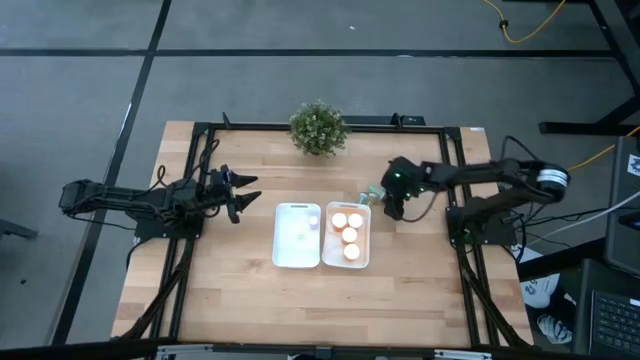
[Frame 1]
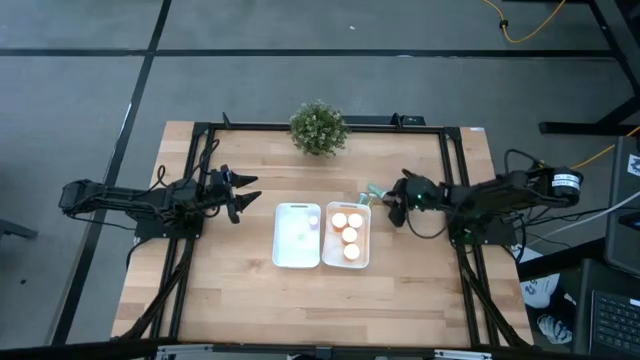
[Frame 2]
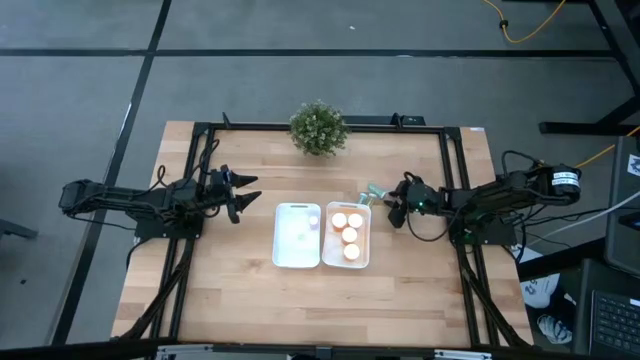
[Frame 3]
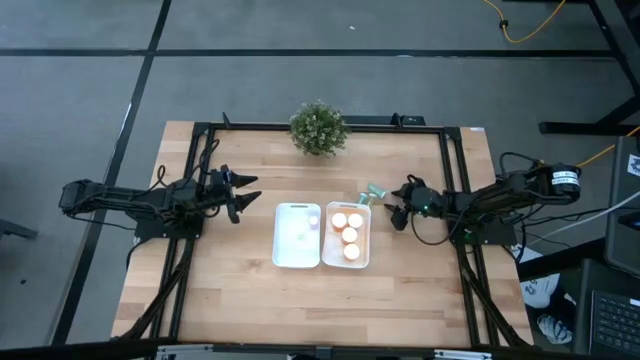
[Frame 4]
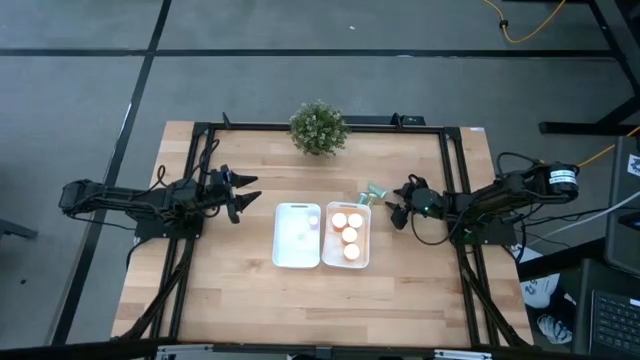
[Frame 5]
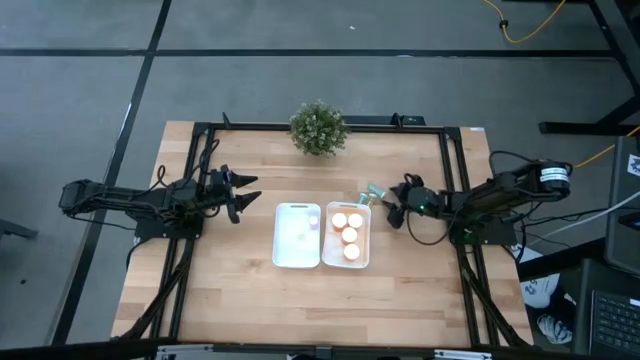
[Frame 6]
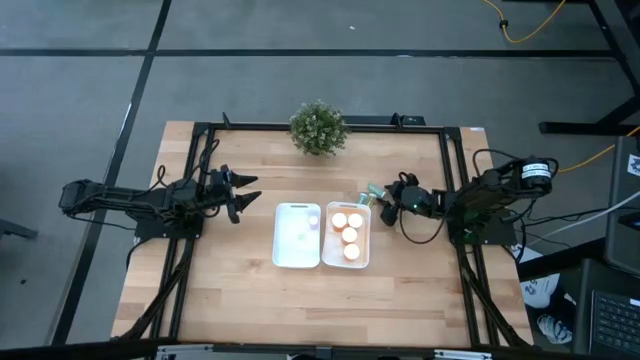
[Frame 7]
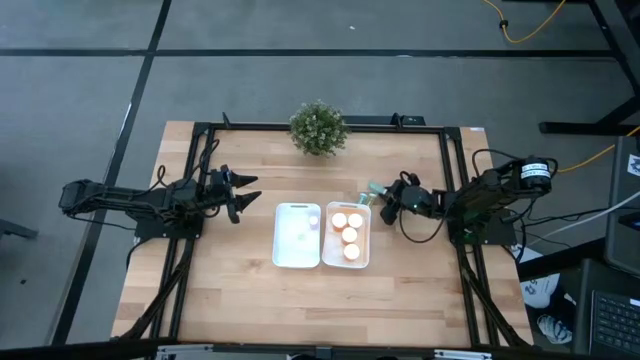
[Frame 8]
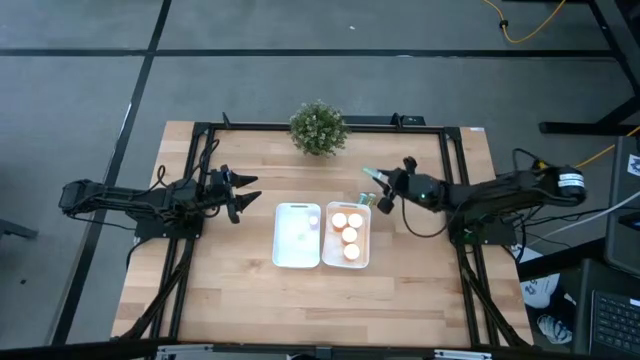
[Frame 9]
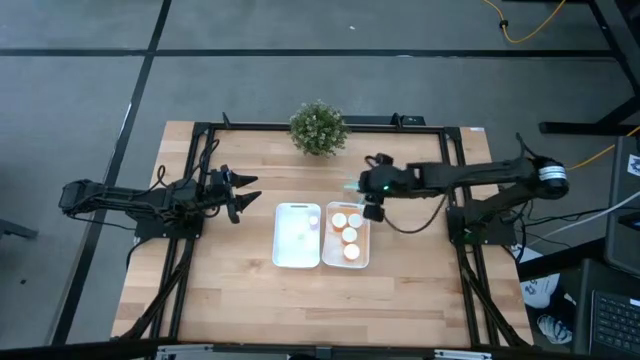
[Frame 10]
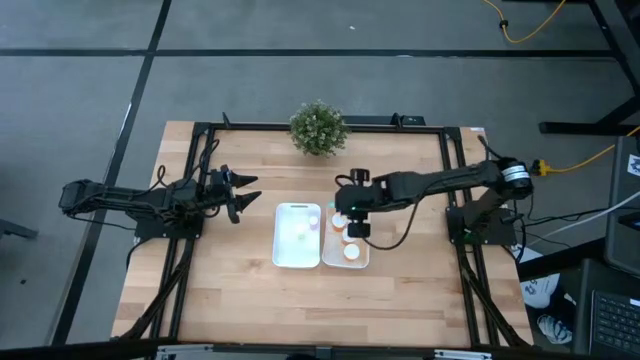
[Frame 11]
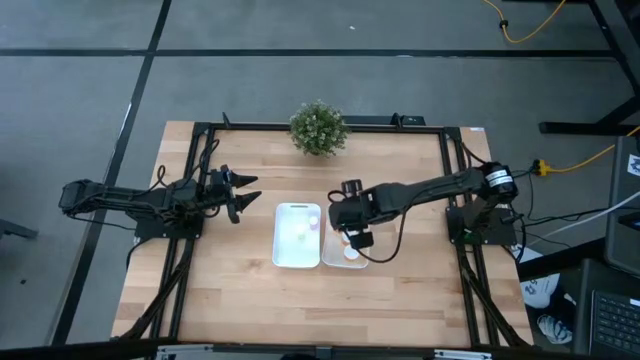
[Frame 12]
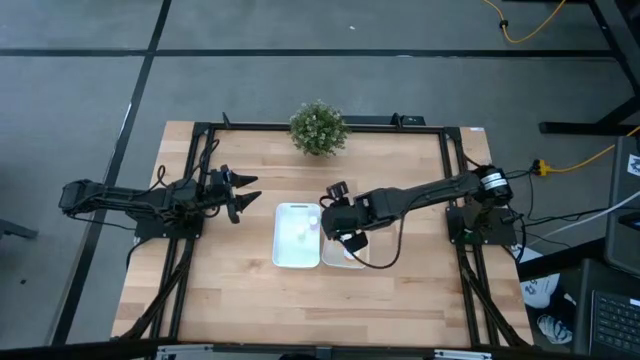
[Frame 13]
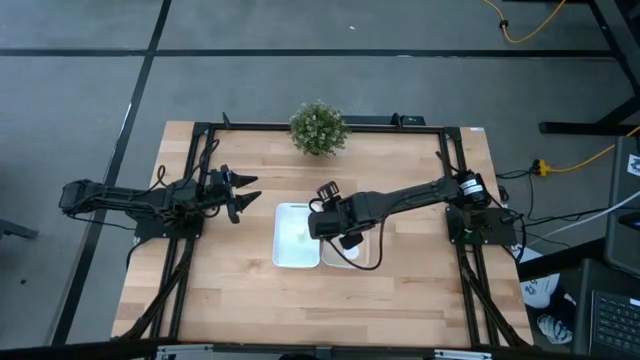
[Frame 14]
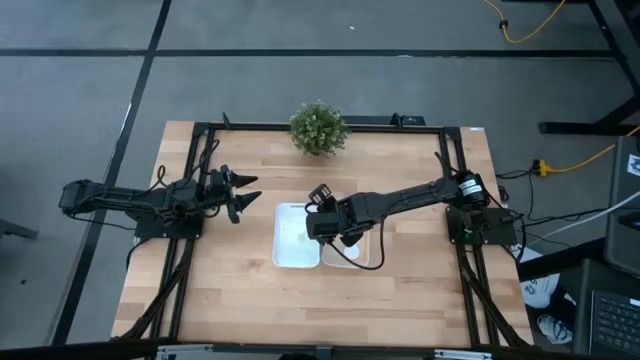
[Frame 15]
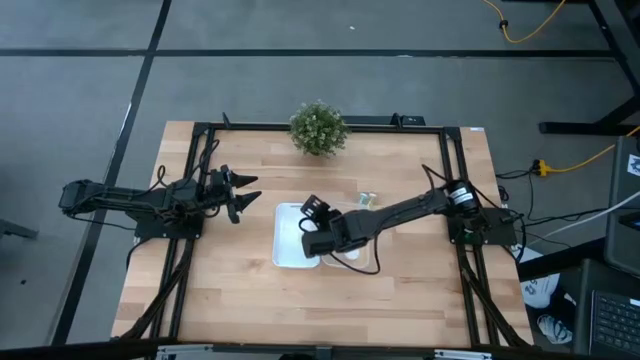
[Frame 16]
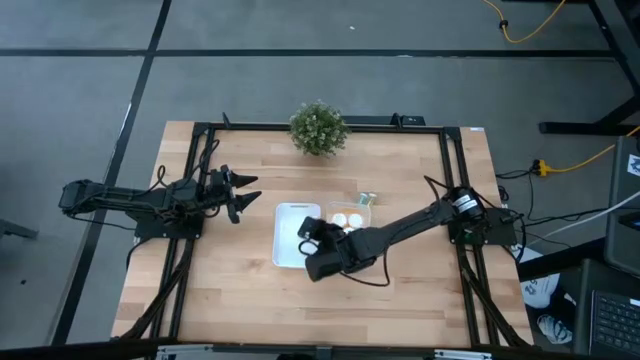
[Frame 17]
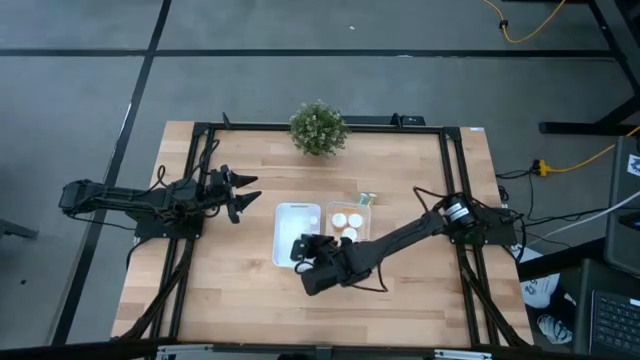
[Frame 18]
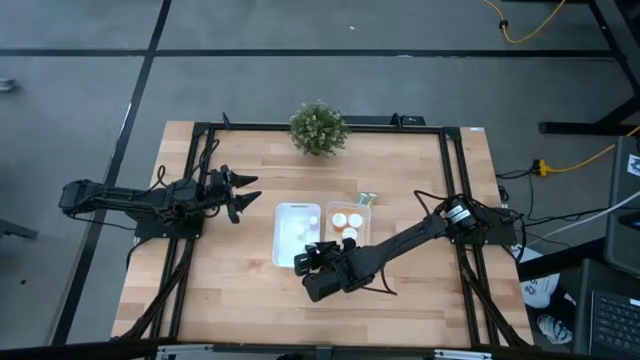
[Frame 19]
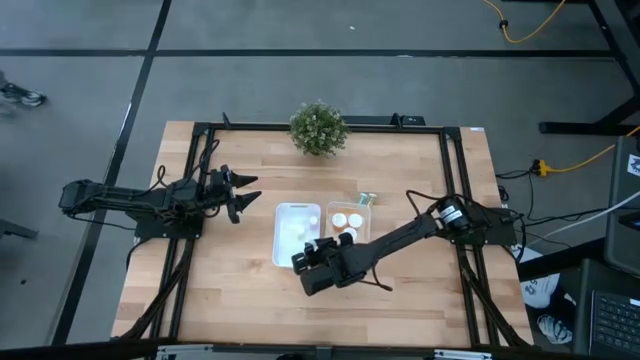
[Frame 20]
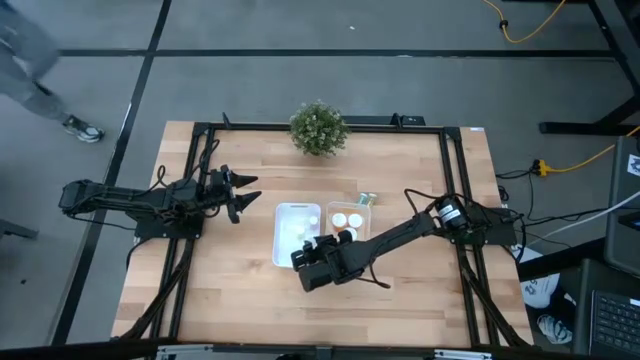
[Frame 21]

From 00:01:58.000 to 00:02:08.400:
Task: Pick and place medicine bottles into bin by pill shape (circle, oval)
Put the blue tablet bottle into the left white bin

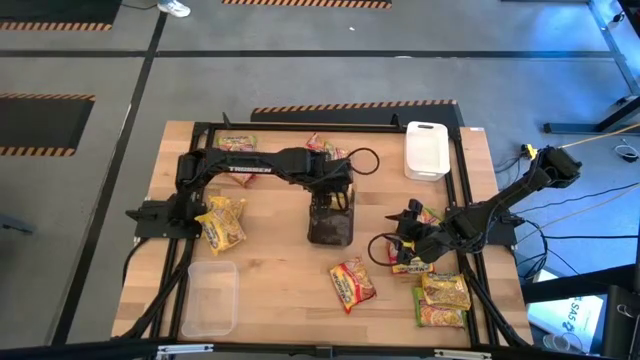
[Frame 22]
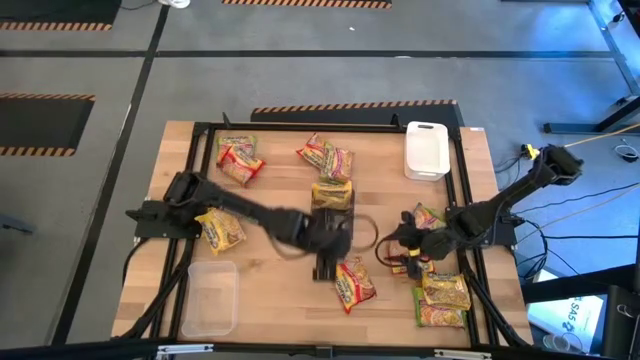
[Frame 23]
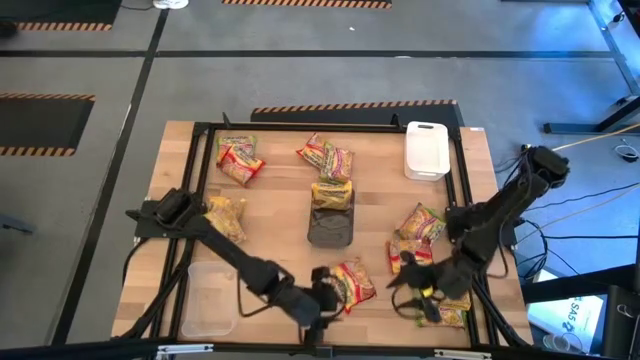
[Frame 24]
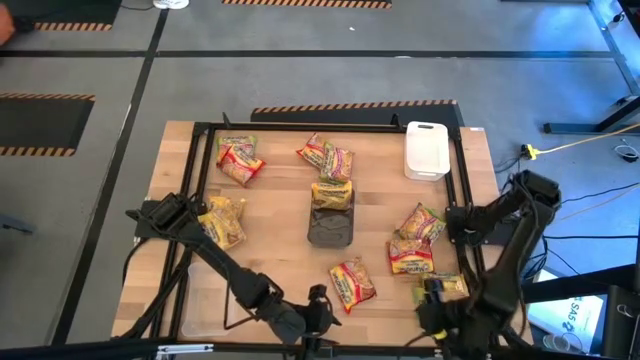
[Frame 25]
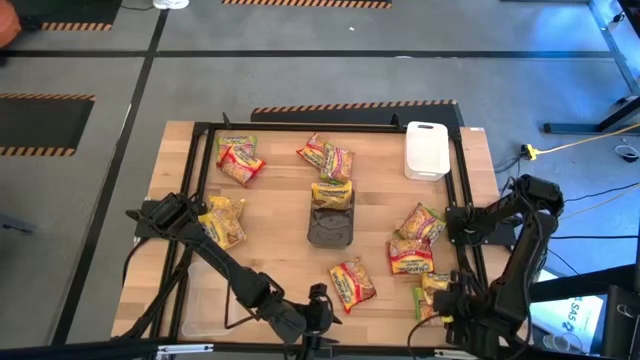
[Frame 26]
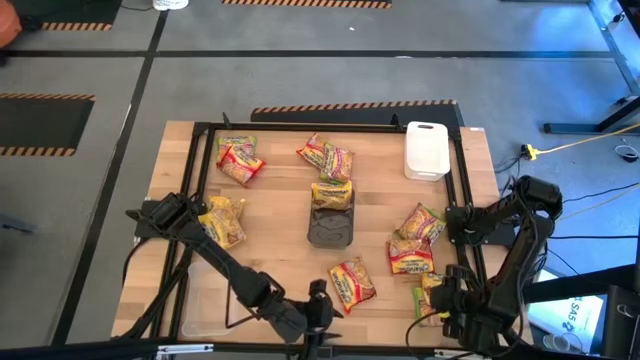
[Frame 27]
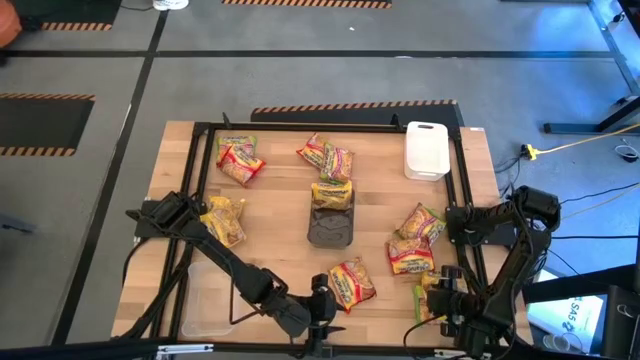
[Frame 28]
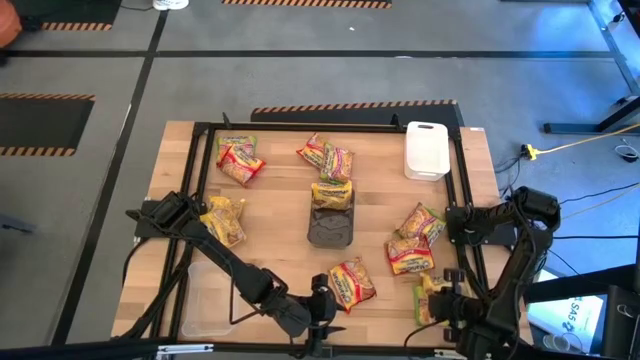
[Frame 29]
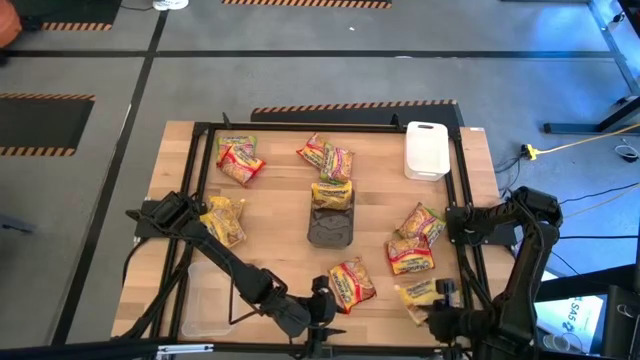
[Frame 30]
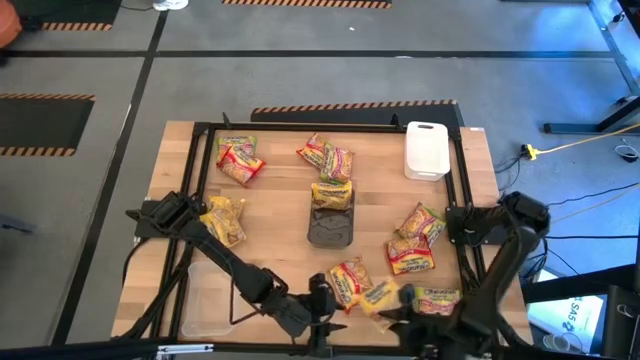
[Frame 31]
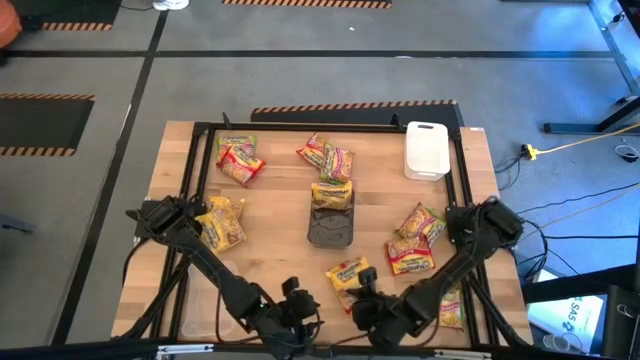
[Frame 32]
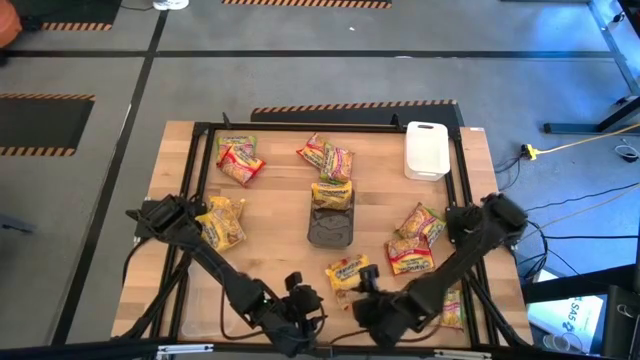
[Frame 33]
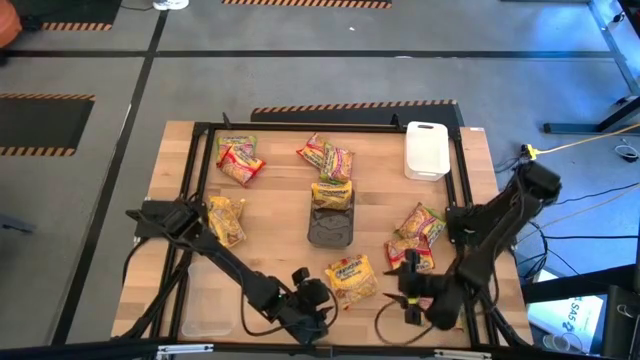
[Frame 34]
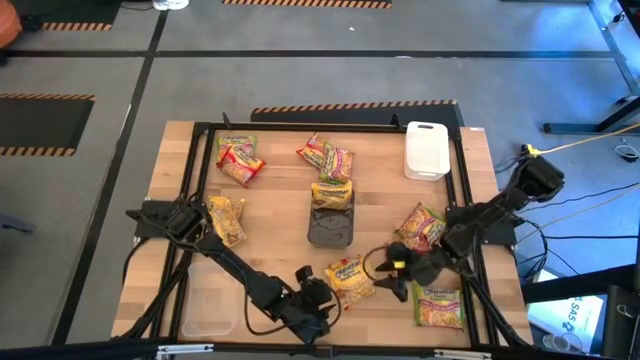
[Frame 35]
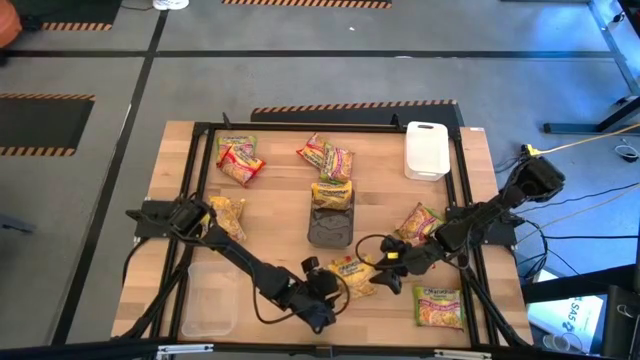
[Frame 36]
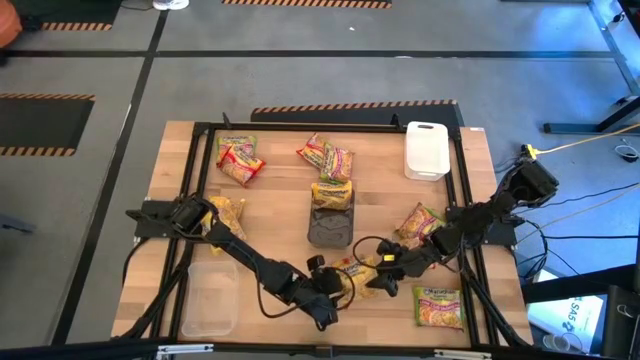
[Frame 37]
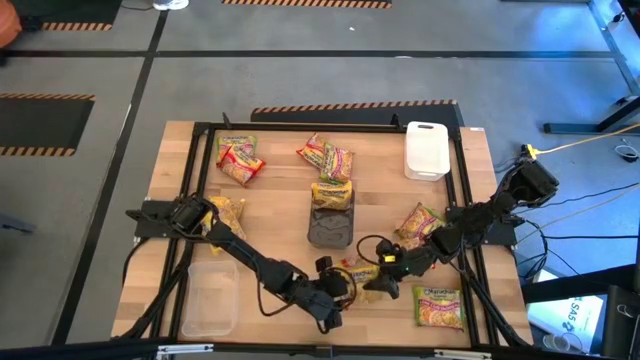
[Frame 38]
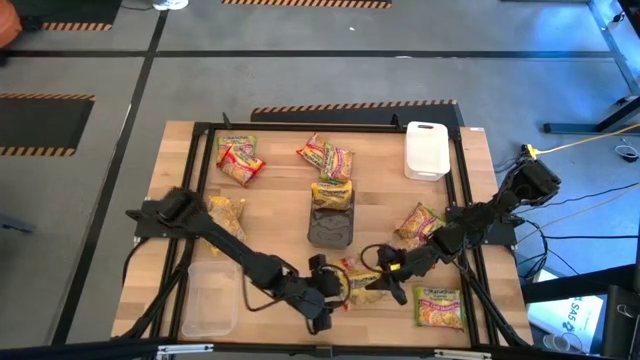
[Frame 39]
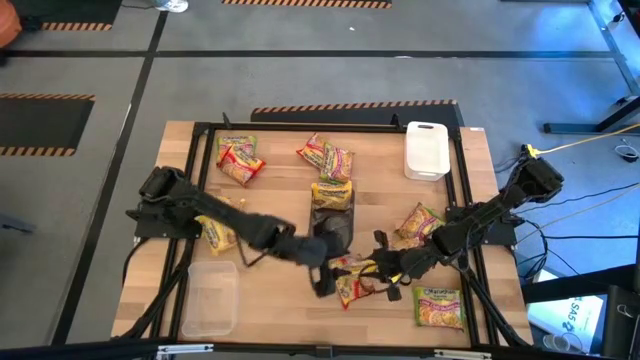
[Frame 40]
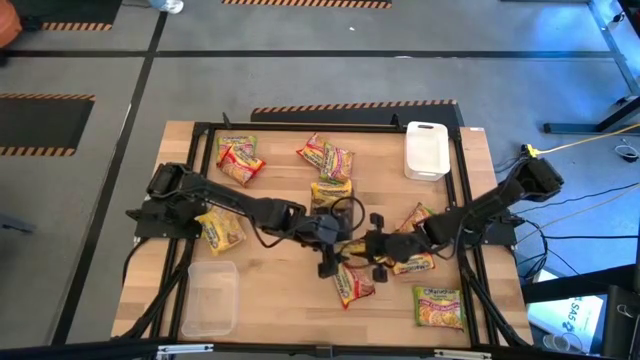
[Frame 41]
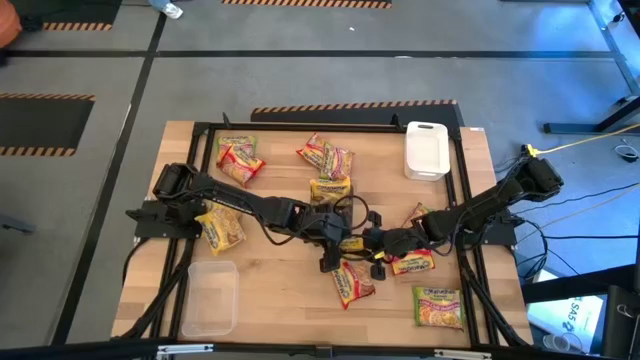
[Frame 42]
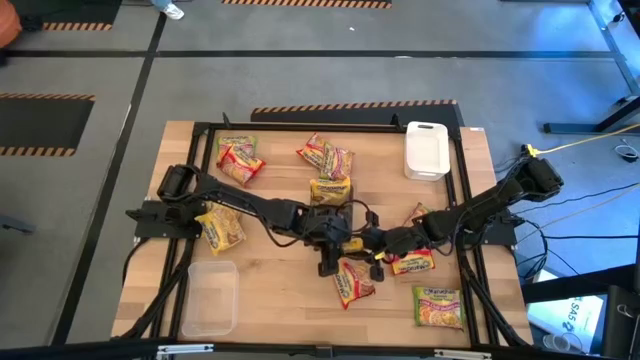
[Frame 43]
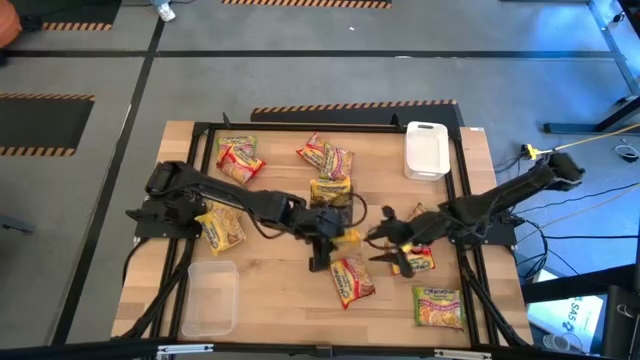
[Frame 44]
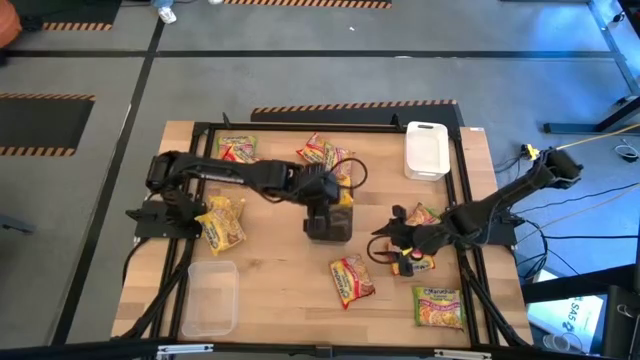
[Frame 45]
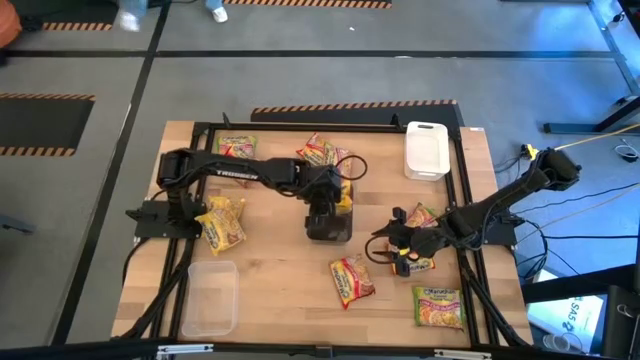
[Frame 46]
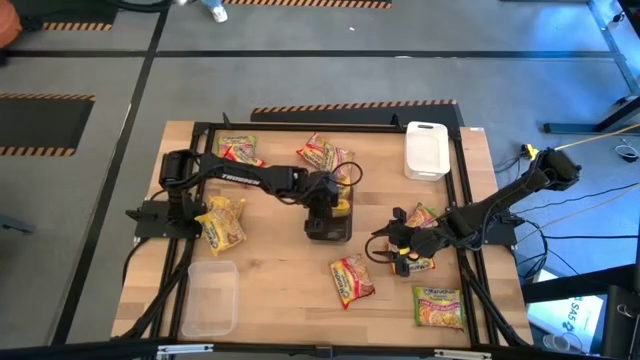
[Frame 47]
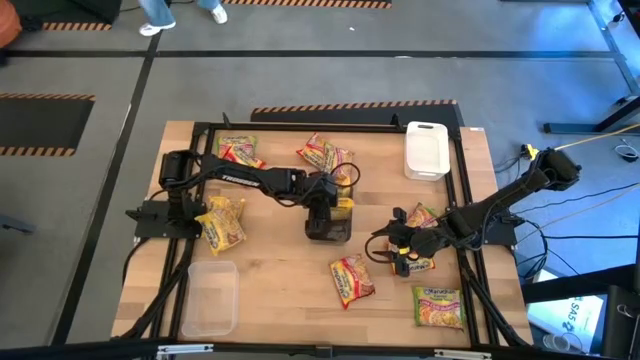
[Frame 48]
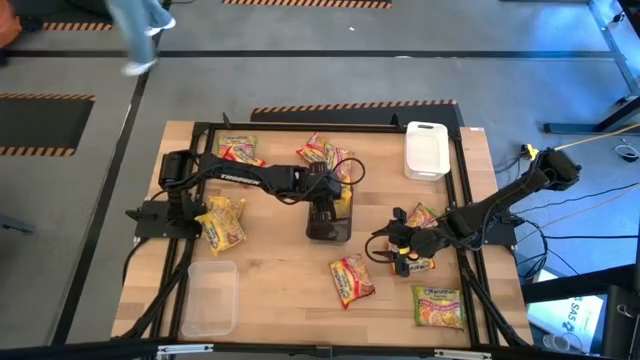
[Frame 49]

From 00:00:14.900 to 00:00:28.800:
Task: Sort Maruchan noodles
Put the yellow noodle pack into the black bin
